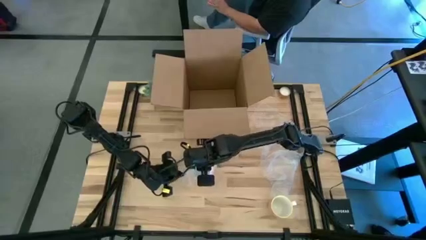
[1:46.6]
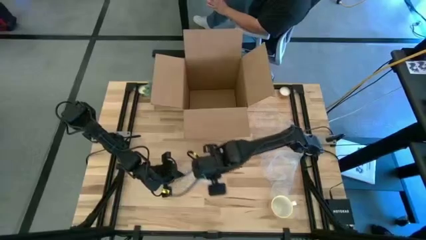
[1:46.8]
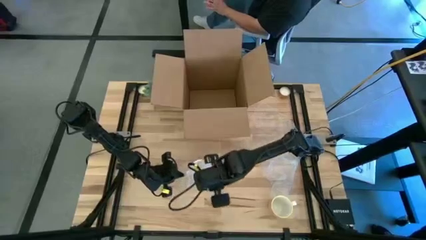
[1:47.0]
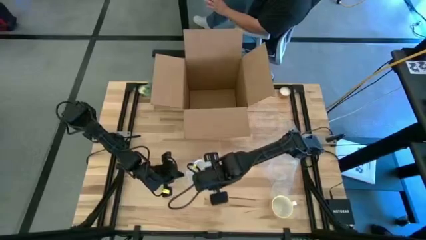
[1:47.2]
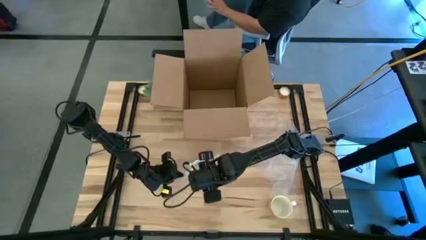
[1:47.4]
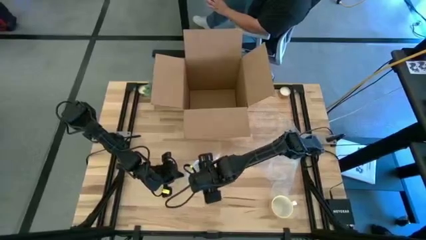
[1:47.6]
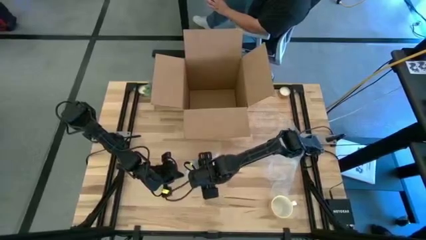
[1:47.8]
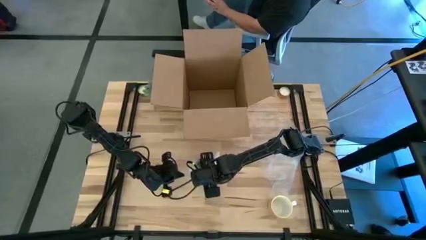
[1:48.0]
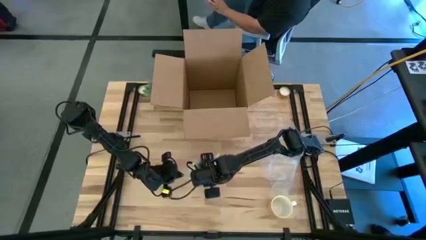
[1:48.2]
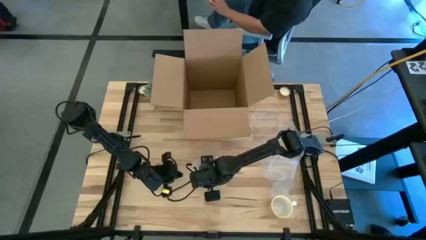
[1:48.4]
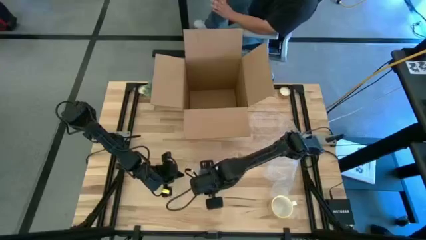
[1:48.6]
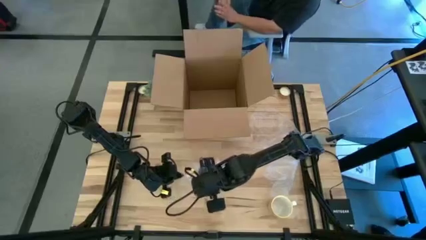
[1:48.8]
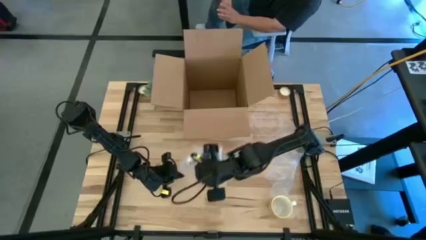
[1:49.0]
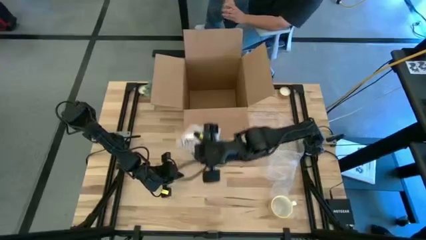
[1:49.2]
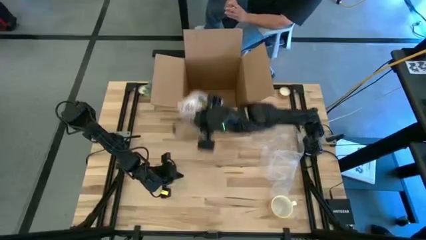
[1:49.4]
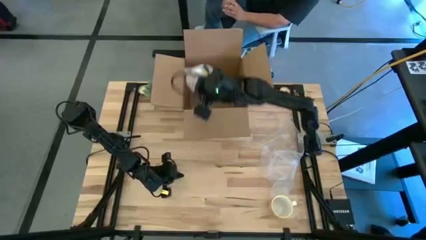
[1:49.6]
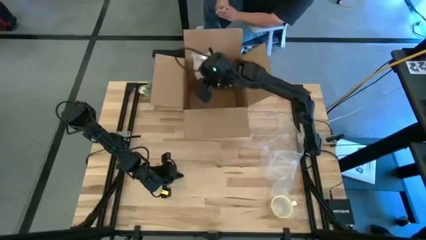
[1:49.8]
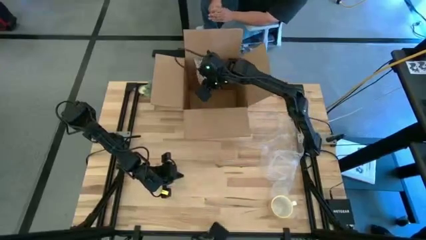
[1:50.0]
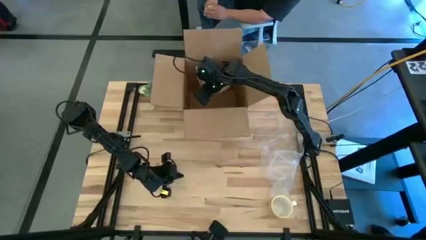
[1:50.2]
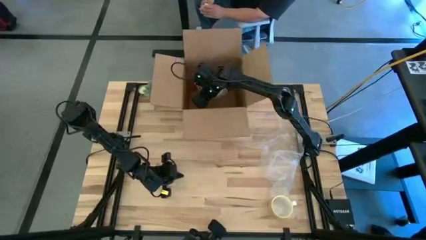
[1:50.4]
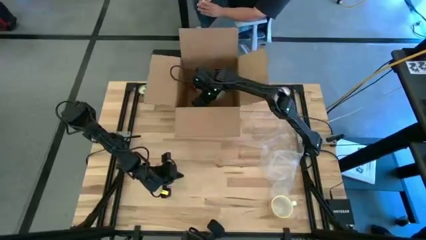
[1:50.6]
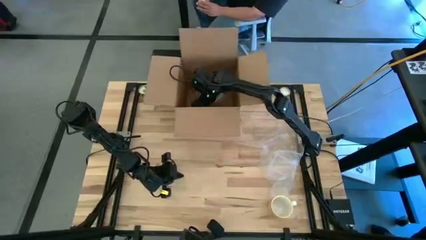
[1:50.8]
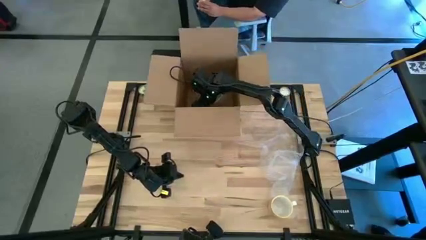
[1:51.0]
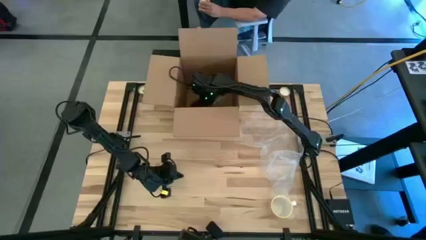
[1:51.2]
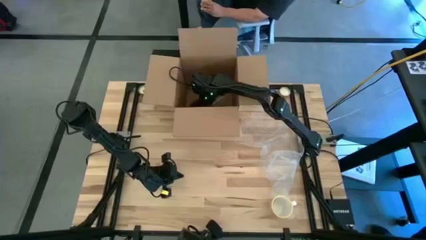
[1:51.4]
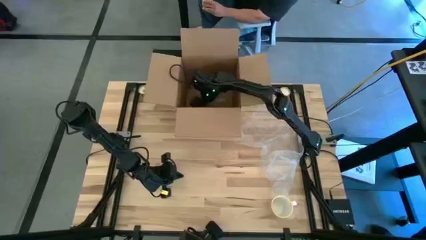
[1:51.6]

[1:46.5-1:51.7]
Task: wrap mug
Put the wrapped red mug into the cardboard box

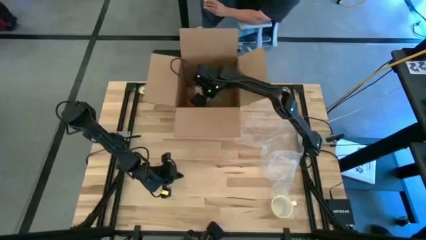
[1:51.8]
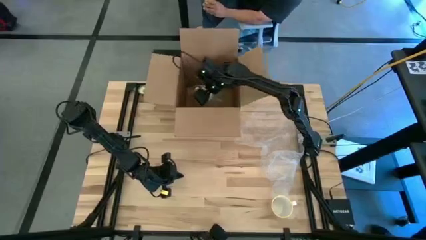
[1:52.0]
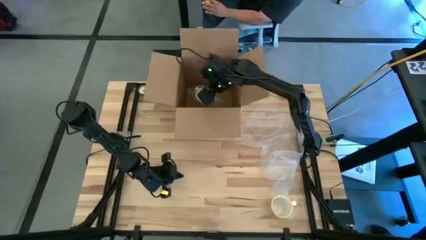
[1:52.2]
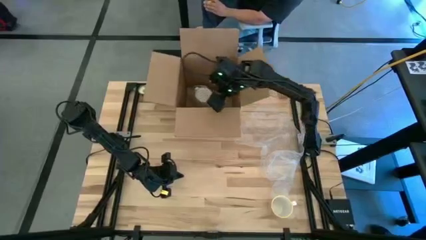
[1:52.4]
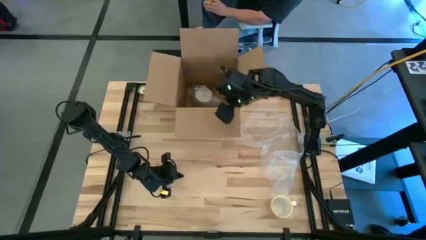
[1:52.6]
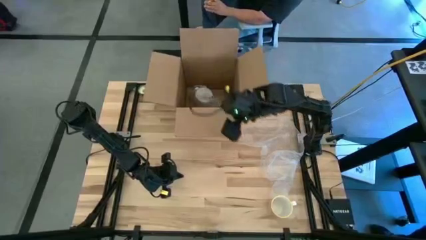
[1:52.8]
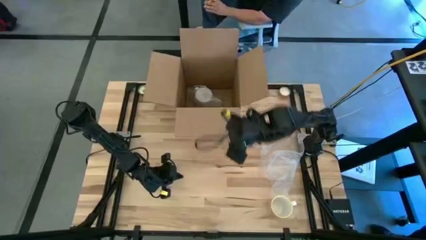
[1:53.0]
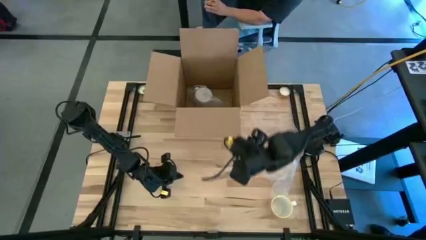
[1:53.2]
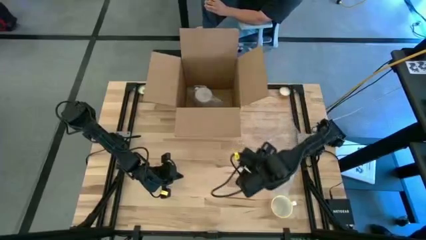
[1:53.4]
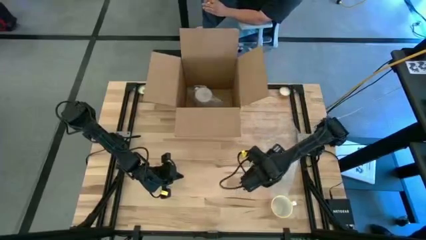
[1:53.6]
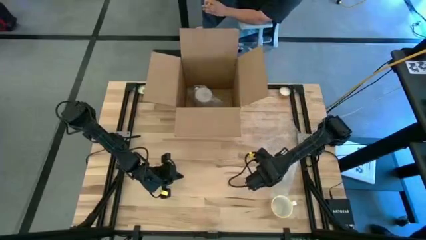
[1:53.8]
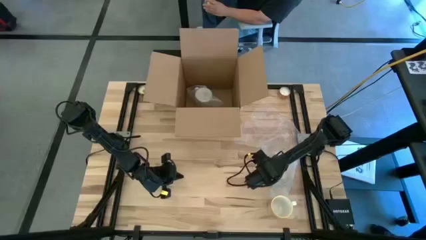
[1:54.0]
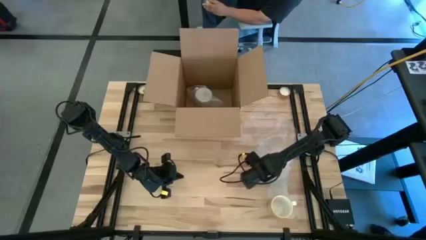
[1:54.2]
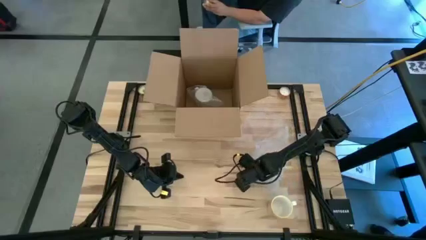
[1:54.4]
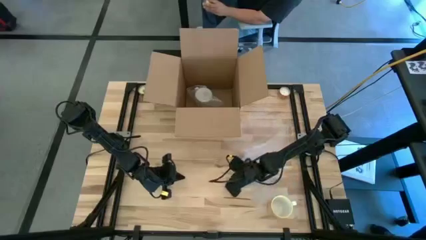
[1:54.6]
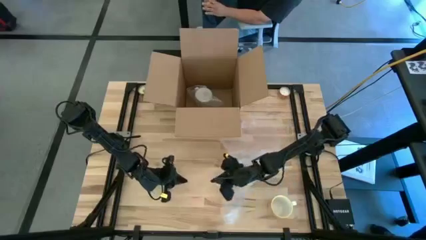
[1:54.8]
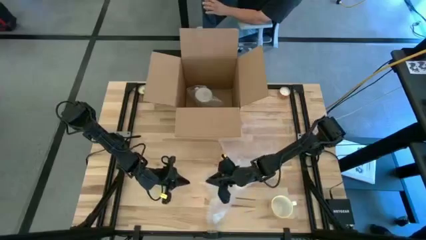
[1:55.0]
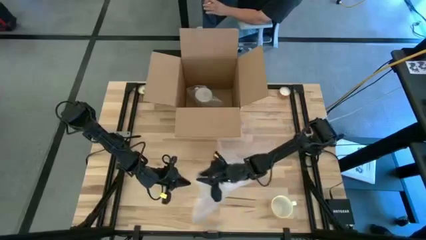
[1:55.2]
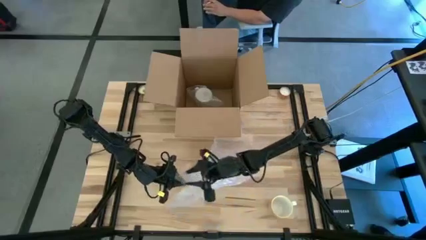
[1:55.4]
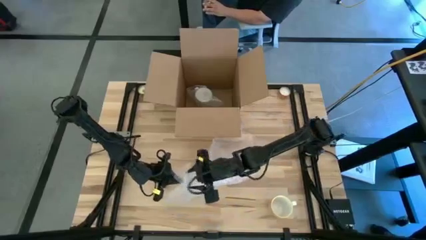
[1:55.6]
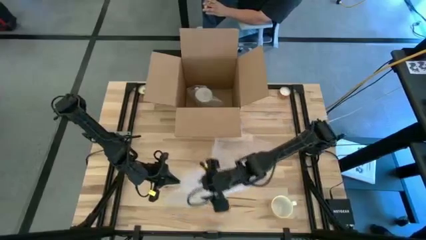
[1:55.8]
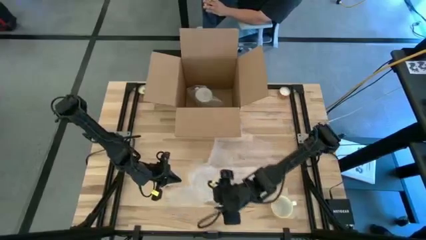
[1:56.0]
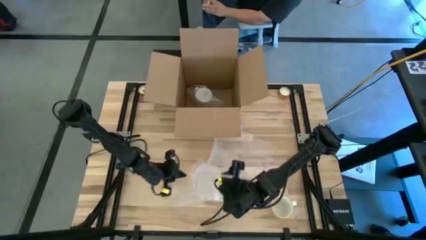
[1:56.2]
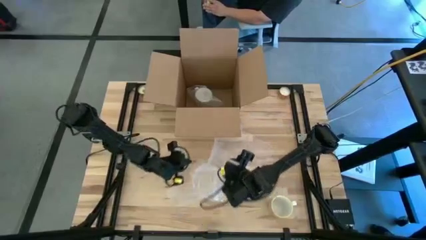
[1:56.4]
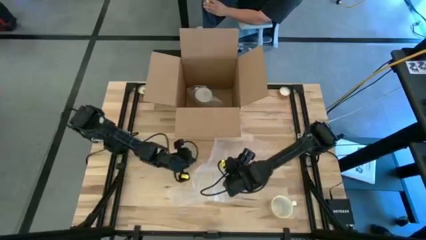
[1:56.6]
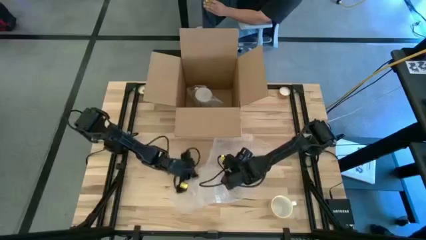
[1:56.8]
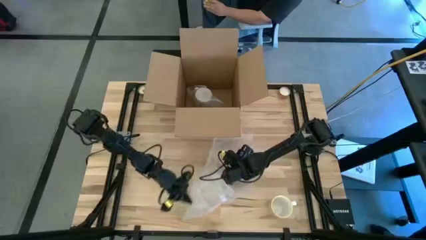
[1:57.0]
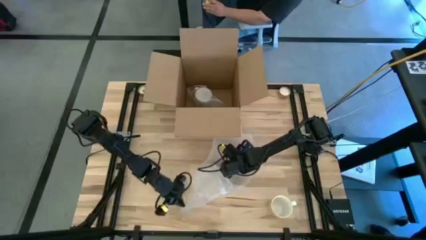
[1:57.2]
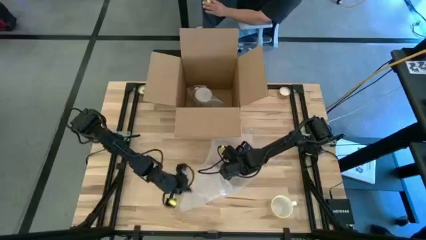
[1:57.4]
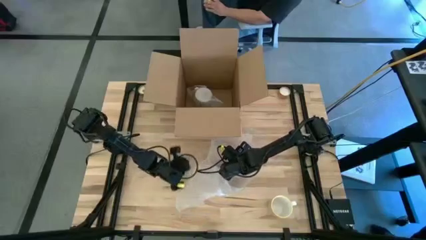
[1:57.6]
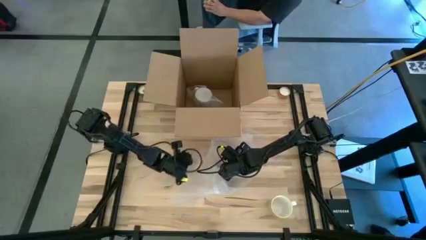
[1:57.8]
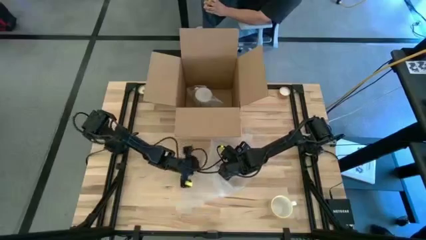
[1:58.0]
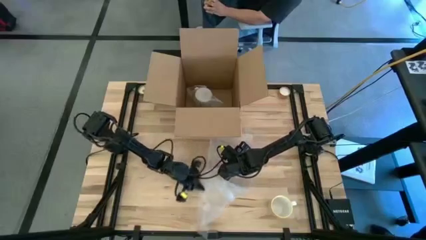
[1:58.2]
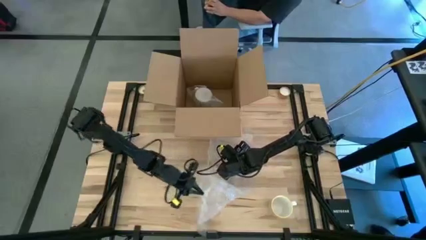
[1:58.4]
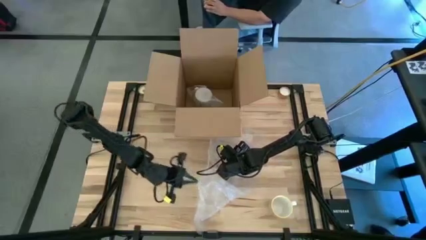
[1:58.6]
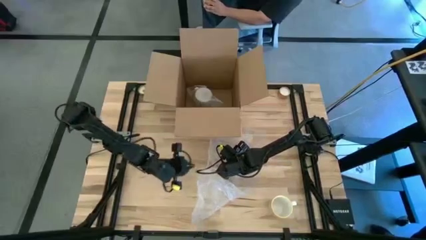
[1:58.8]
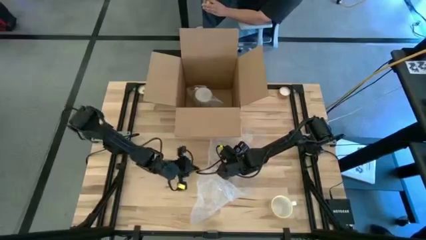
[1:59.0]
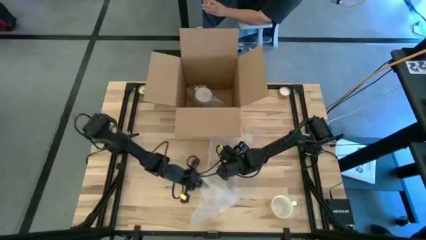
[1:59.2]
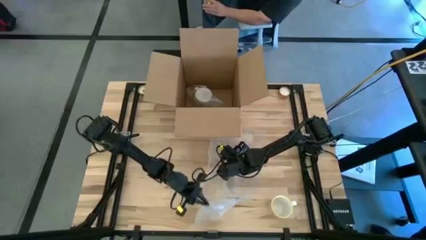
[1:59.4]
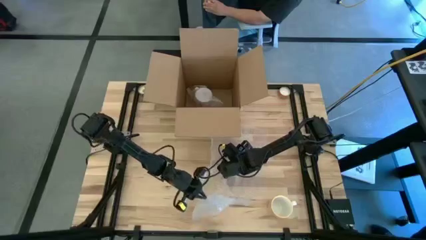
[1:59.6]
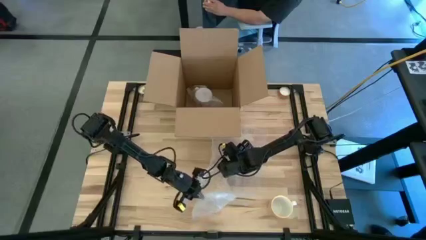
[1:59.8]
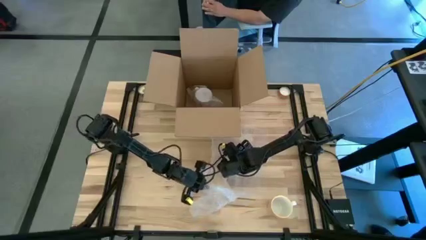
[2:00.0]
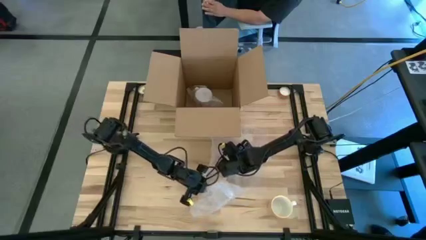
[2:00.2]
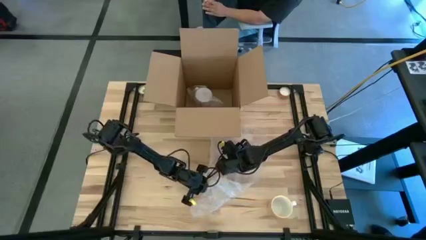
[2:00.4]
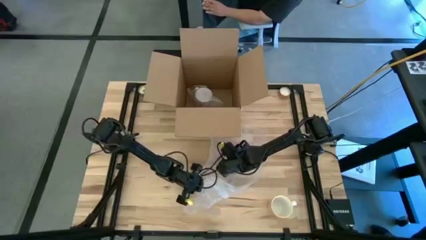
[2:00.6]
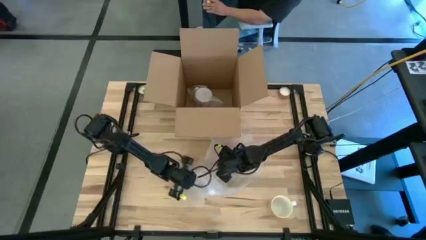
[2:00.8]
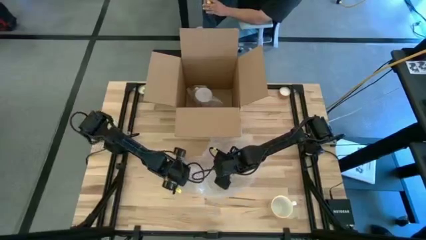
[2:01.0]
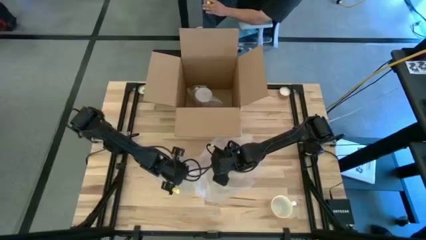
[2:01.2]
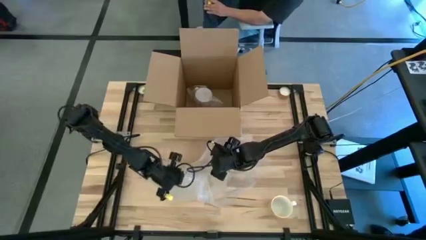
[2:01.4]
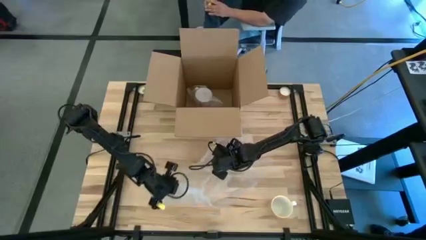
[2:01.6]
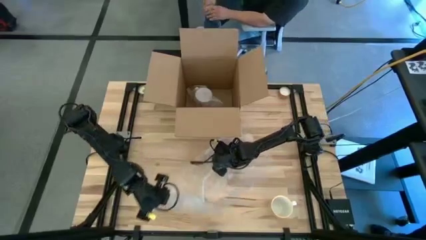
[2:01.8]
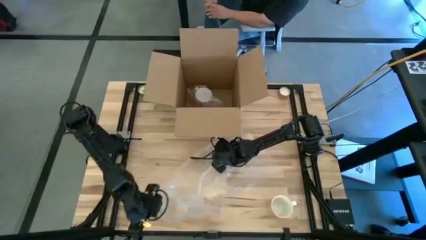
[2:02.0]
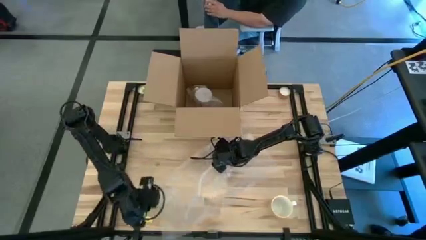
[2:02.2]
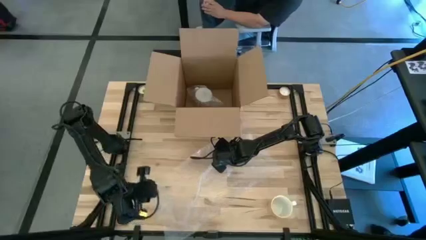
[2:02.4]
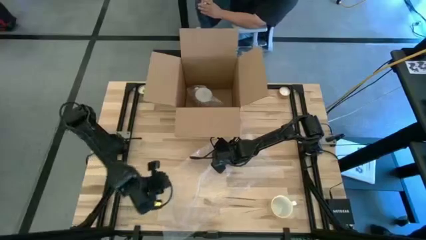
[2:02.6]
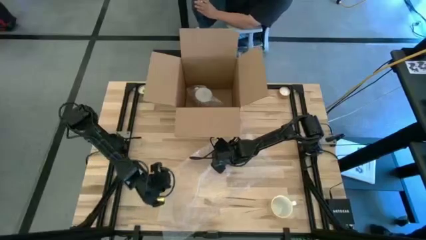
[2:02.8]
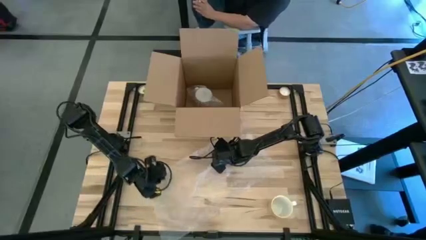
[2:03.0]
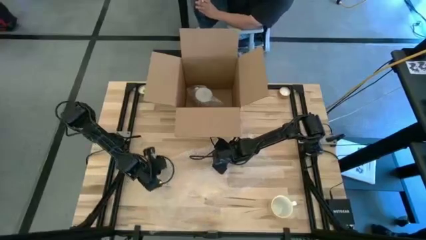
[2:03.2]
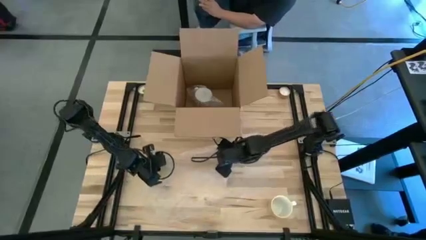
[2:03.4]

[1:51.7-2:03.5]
Prepare the bubble wrap
